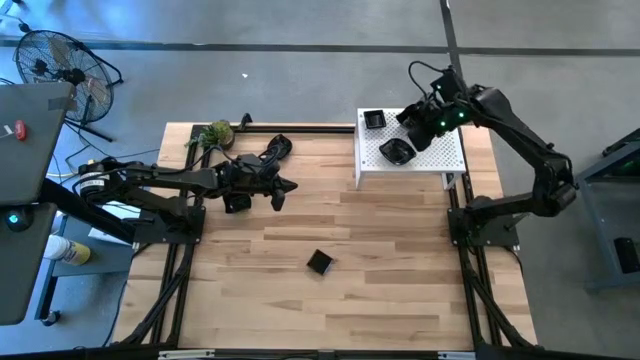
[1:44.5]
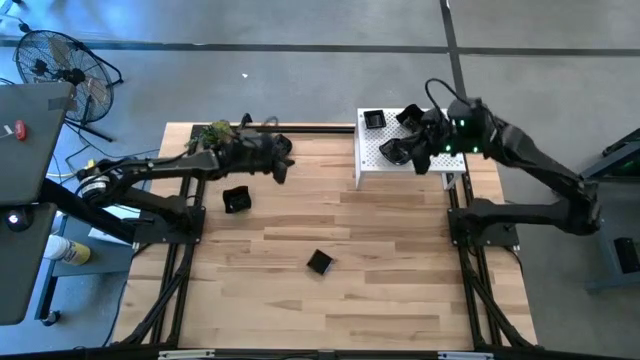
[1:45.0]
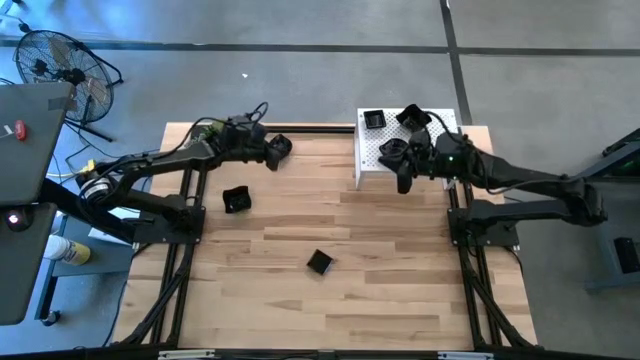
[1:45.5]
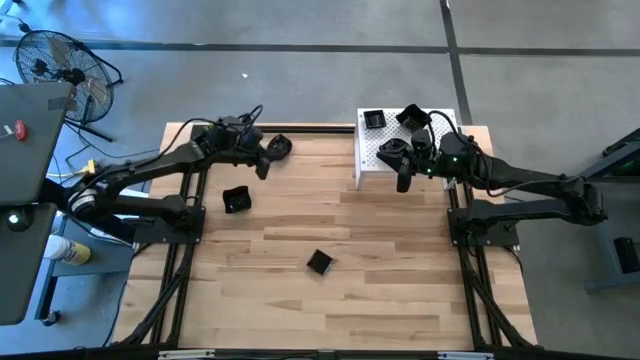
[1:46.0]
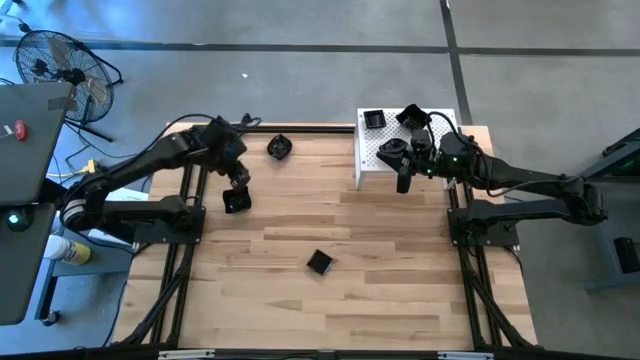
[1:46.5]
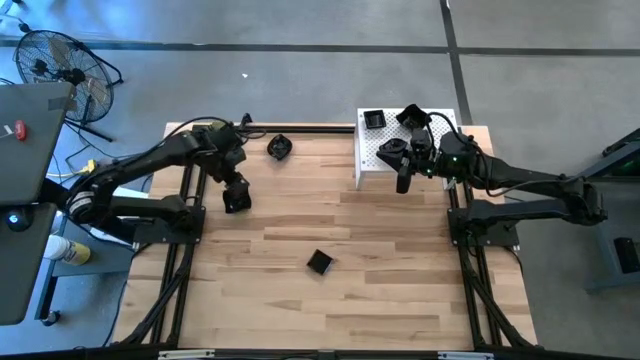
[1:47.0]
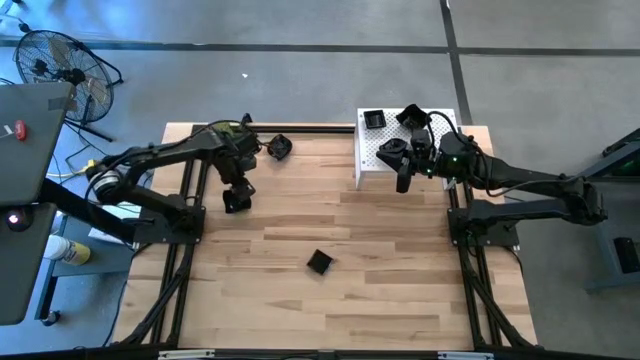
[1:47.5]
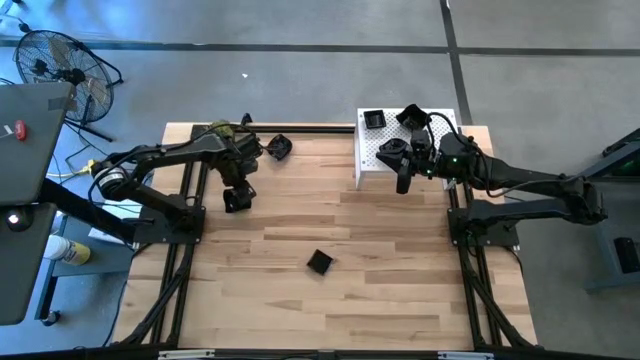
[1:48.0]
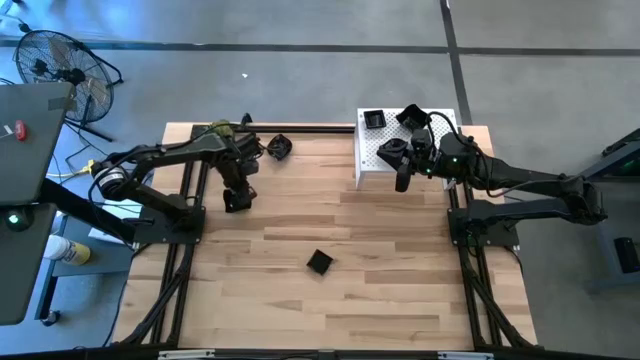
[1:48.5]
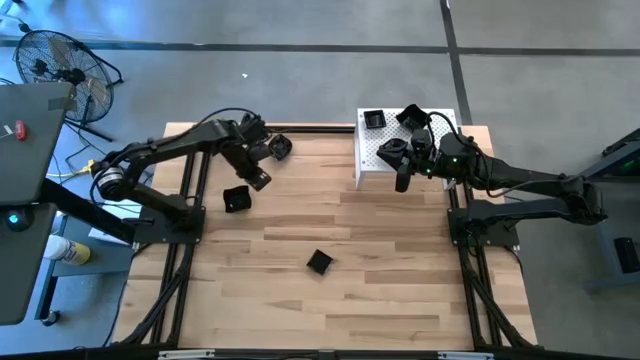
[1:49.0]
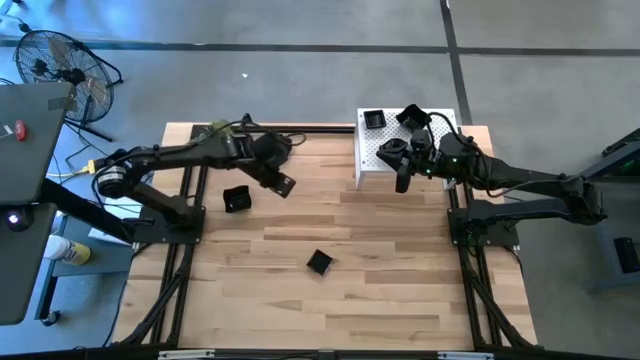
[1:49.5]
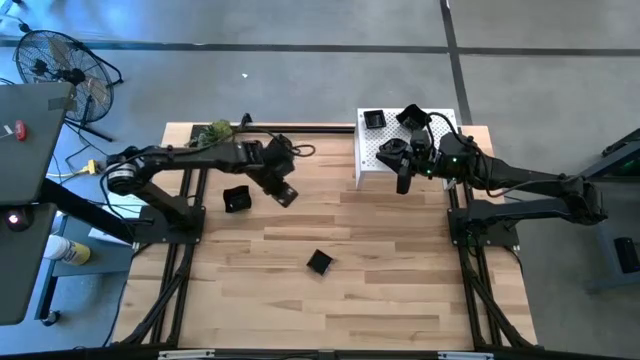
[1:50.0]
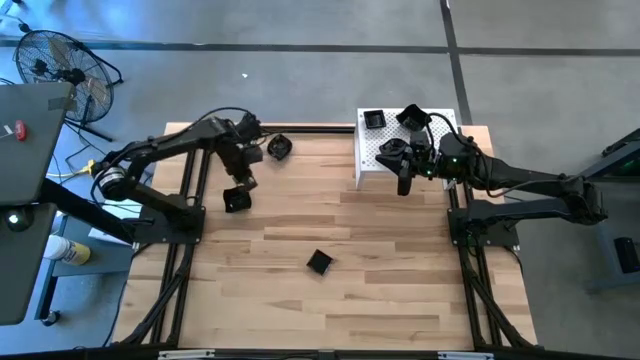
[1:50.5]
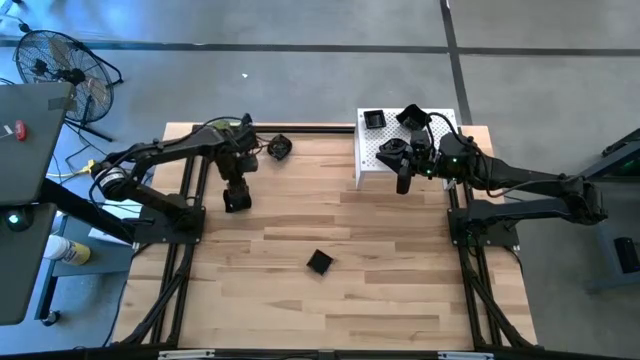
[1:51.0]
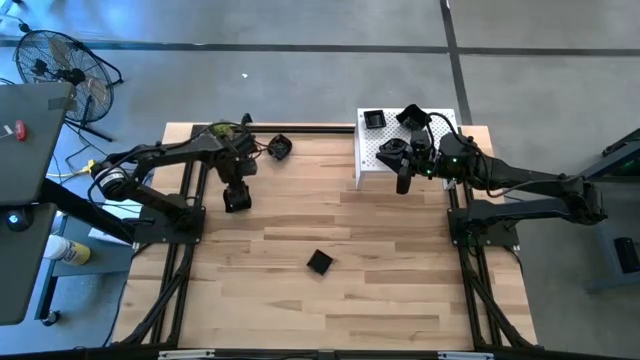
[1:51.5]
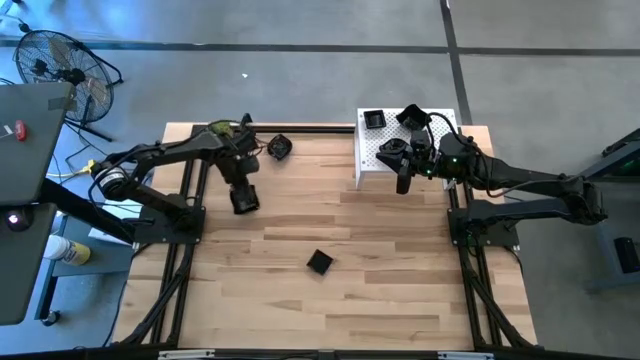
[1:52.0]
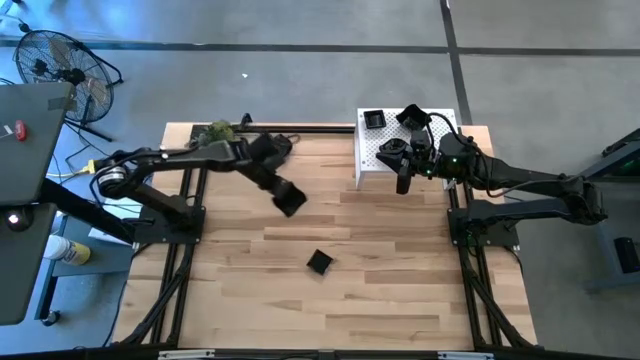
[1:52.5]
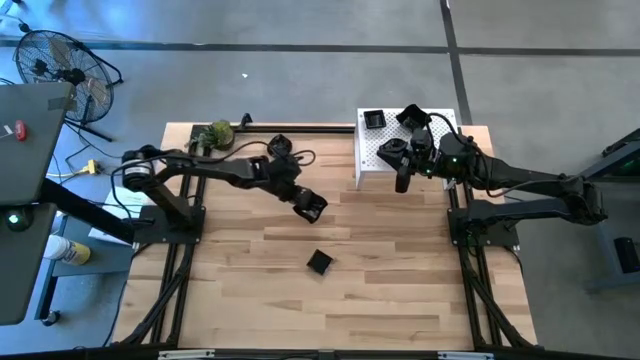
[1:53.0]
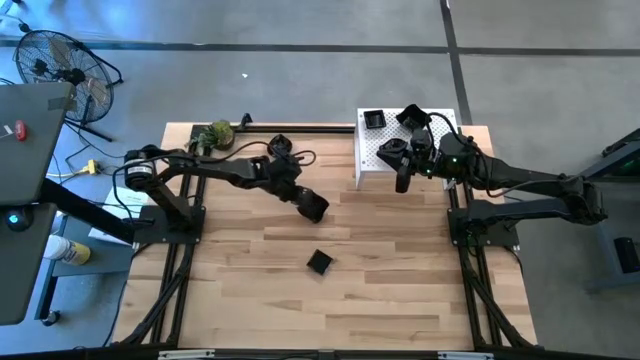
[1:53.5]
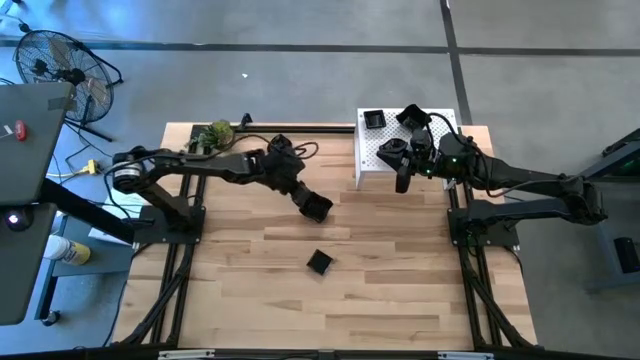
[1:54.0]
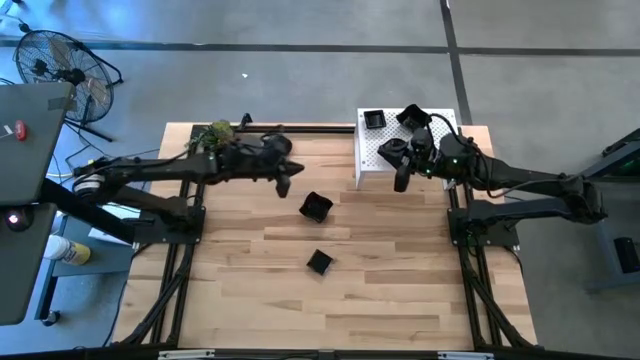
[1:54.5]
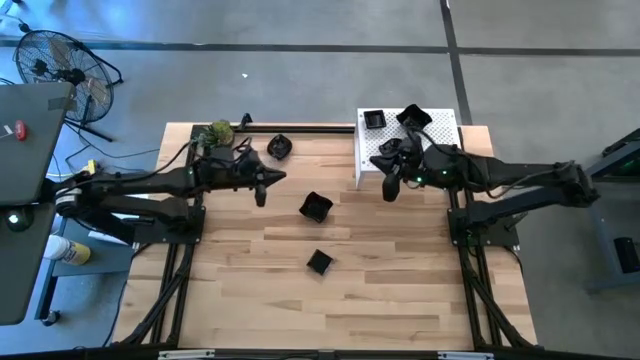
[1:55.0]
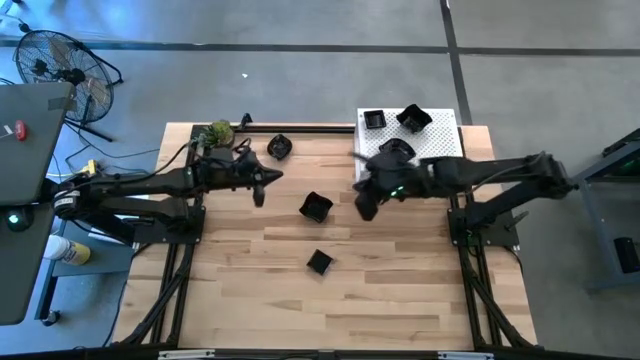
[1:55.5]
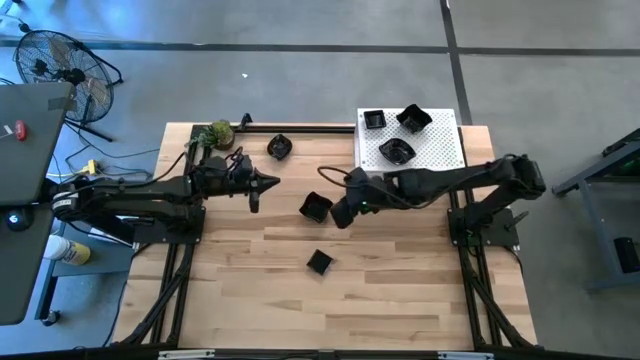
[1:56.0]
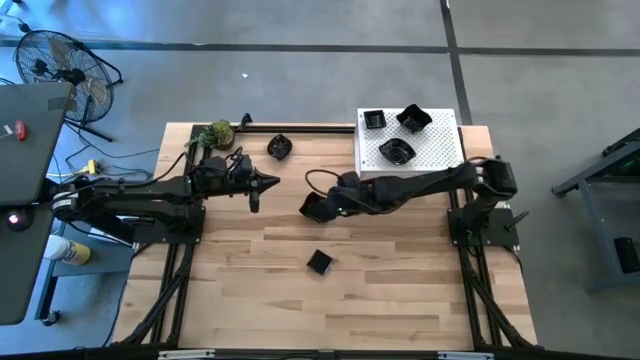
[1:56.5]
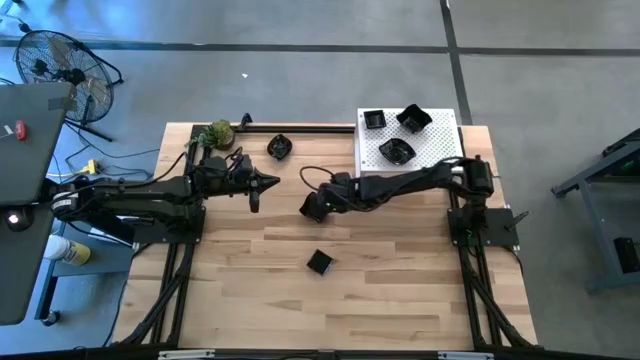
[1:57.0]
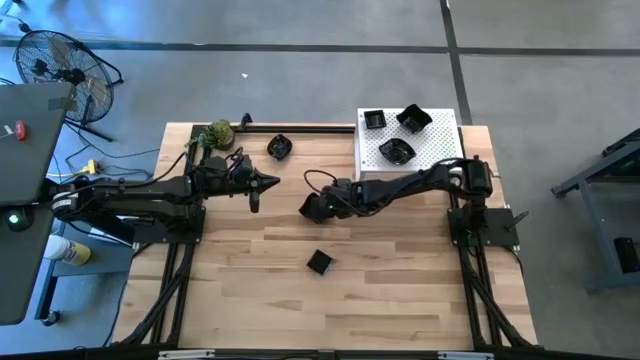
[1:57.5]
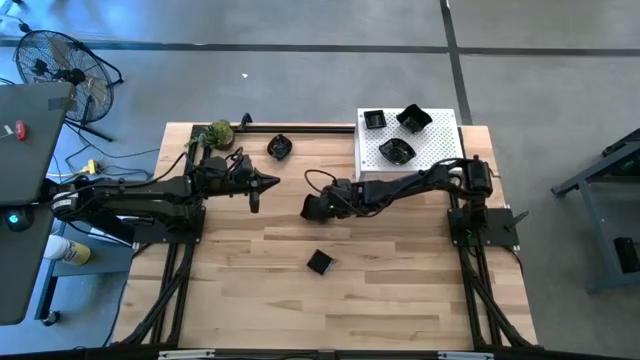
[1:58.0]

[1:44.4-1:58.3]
Task: Pick & Place Mini shaped plates
Stack the distorted square plate on top of the stacked distorted square plates on the shelf

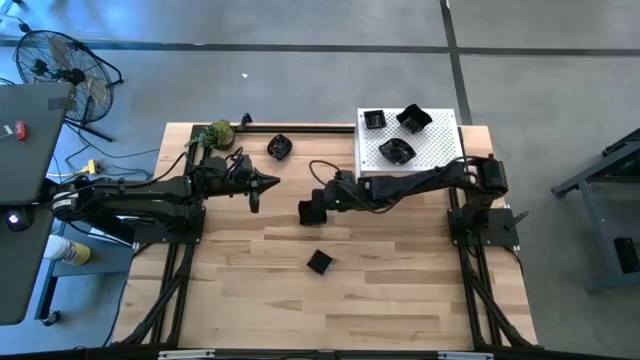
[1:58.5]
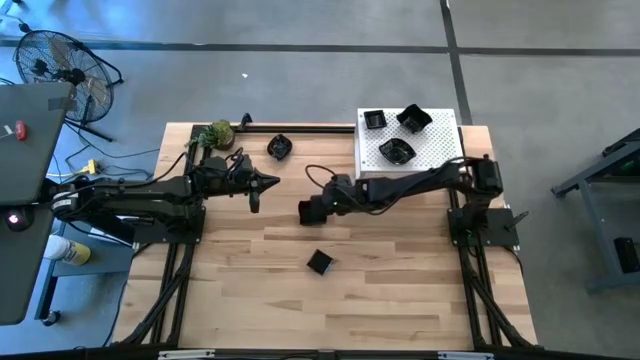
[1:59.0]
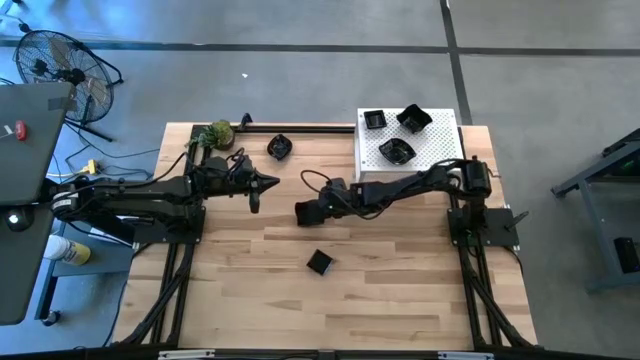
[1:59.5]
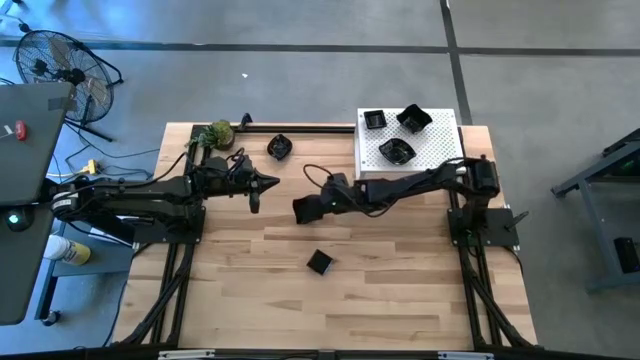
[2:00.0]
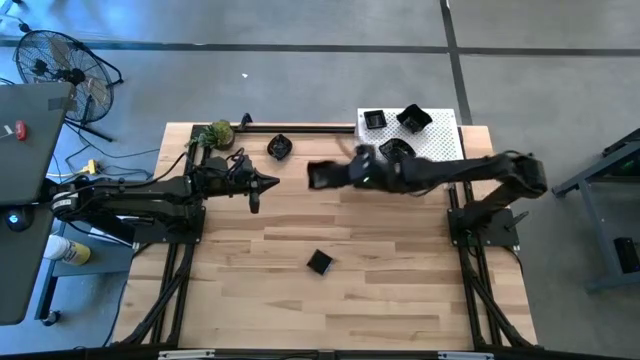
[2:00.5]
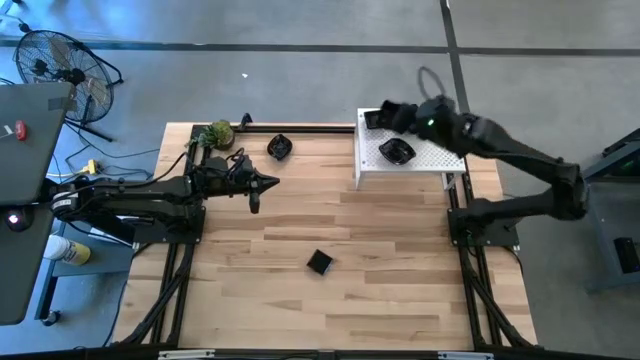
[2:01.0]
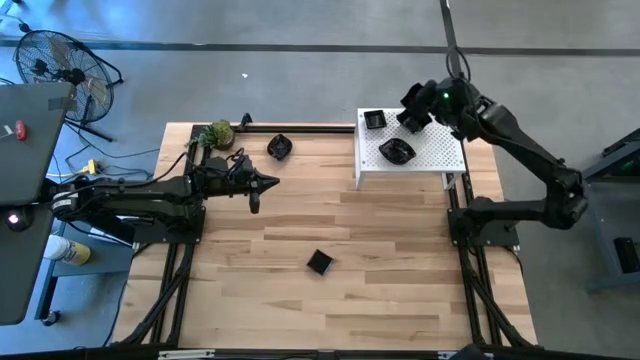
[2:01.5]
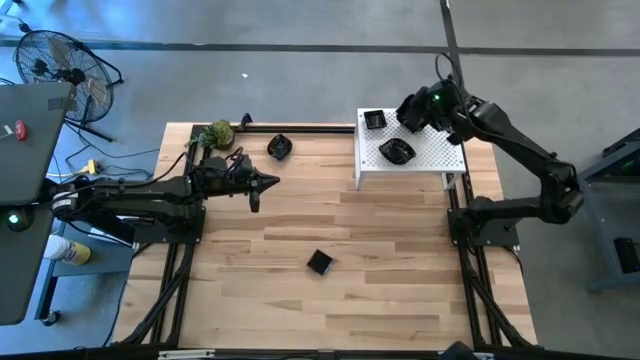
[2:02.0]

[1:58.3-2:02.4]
Stack the distorted square plate on top of the stacked distorted square plates on the shelf

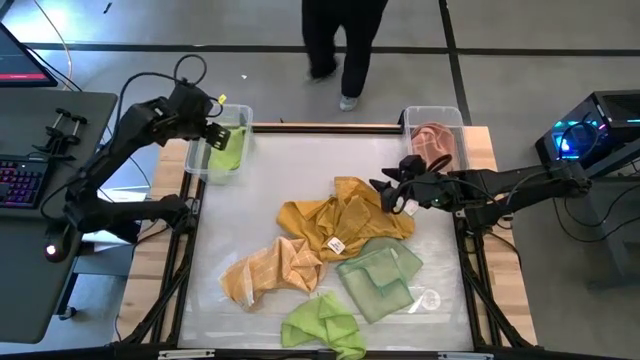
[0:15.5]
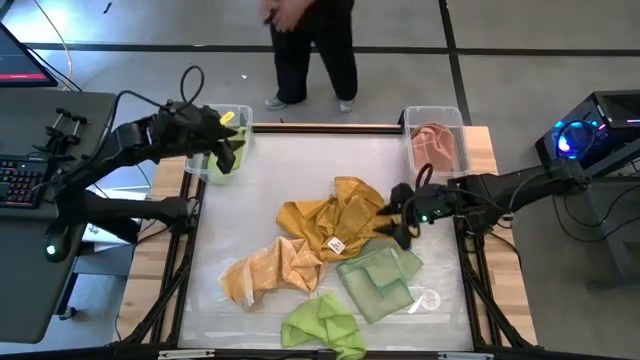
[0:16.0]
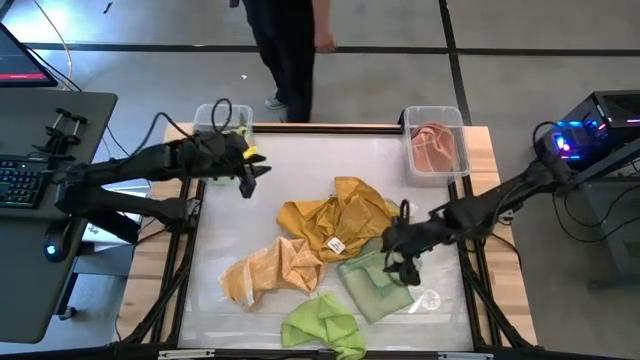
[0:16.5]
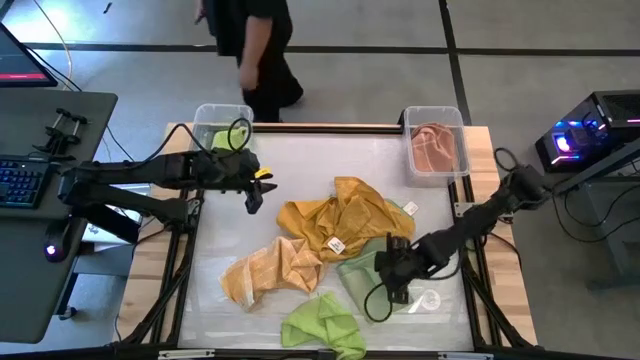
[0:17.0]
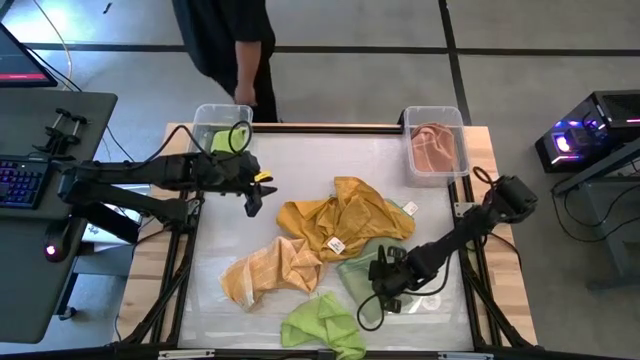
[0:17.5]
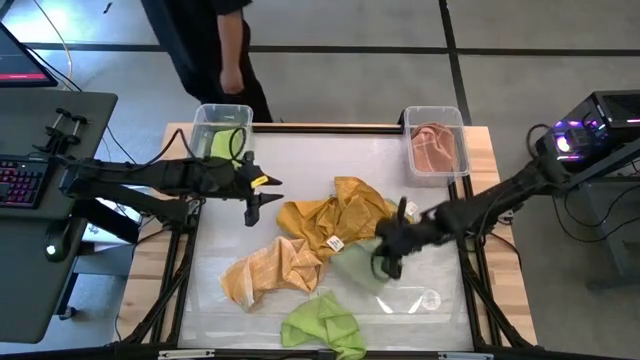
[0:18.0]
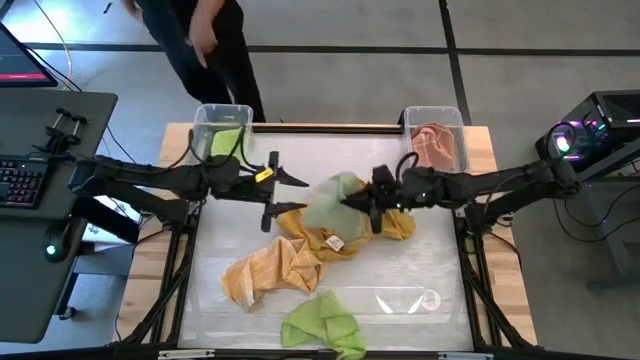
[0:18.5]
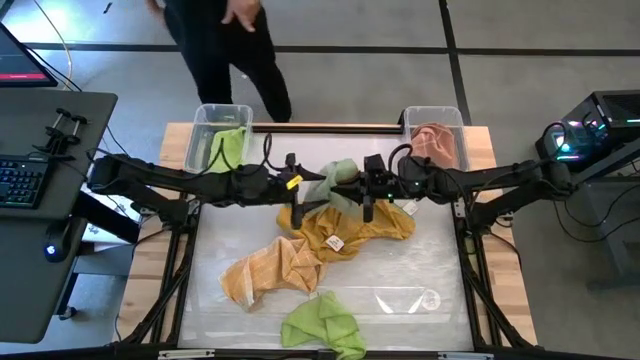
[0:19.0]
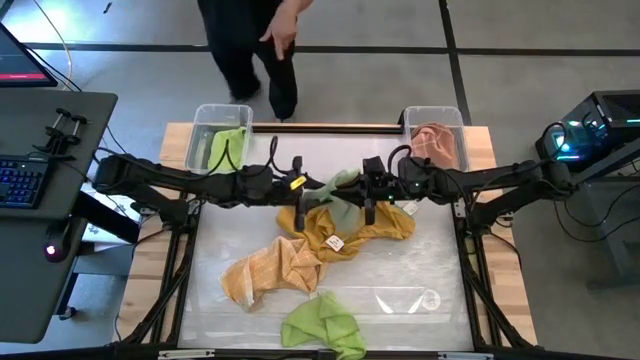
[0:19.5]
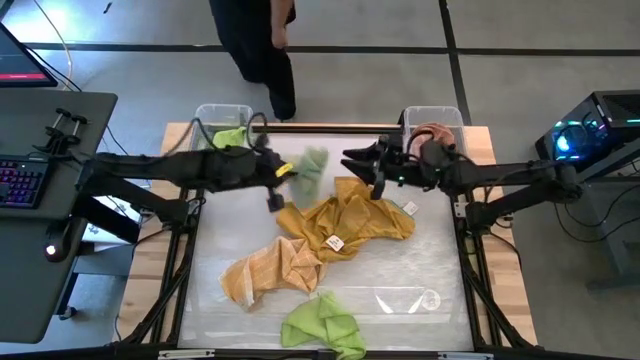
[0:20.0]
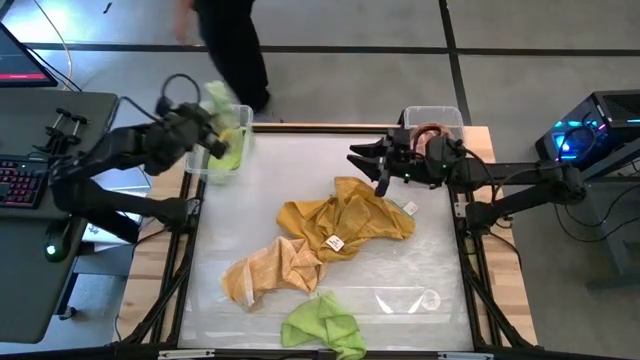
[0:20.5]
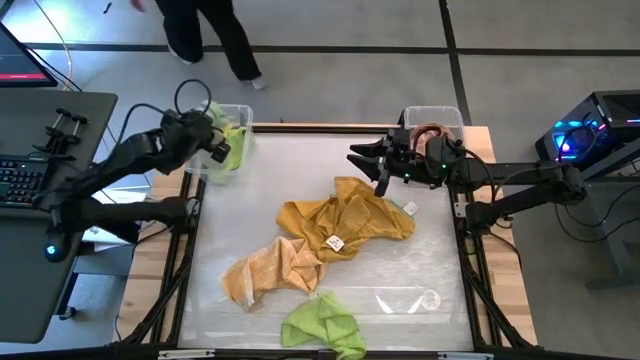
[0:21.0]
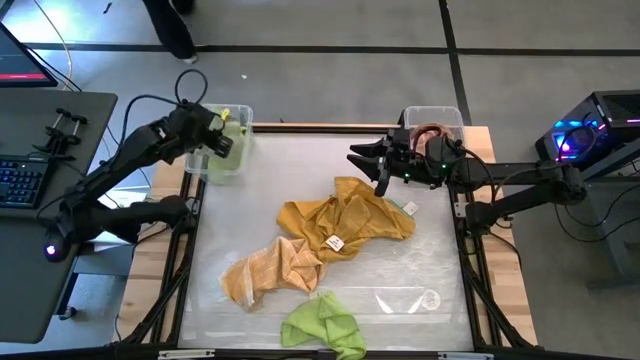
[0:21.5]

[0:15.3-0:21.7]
Task: Sort towels by color in basket
Put the green microfiber towel into the left transparent bin
